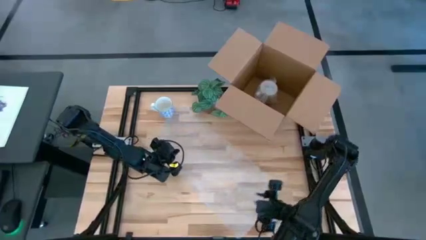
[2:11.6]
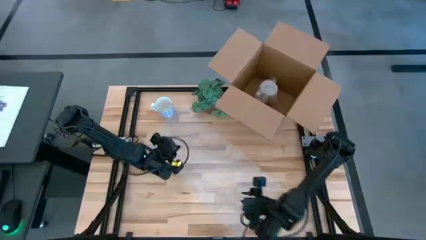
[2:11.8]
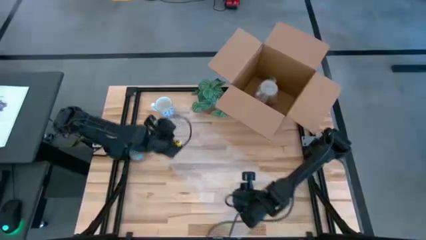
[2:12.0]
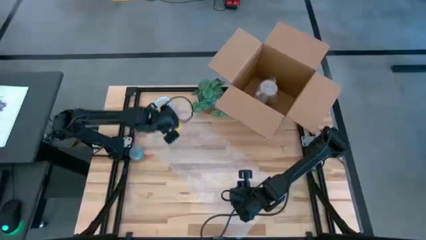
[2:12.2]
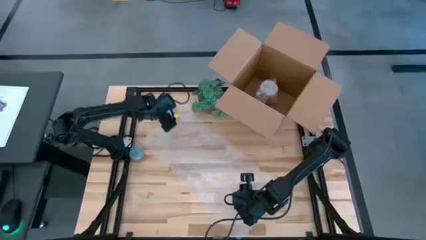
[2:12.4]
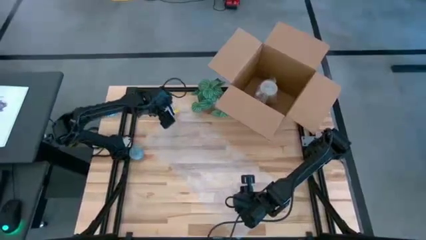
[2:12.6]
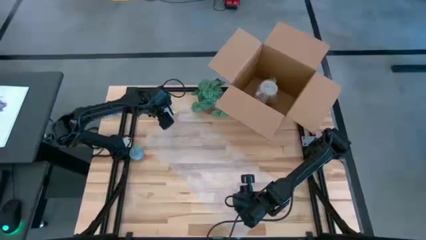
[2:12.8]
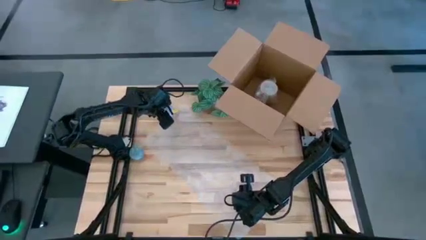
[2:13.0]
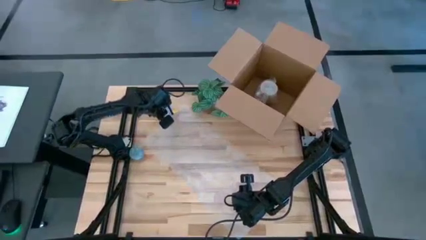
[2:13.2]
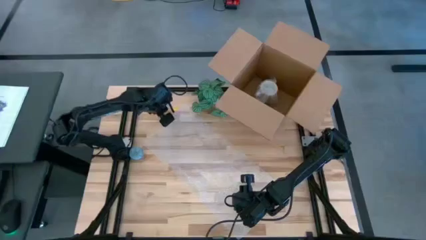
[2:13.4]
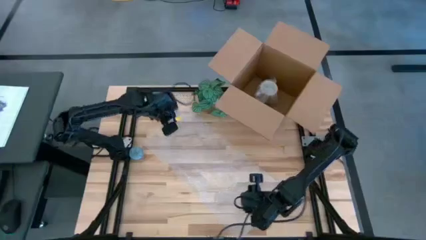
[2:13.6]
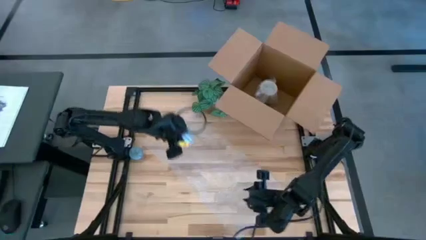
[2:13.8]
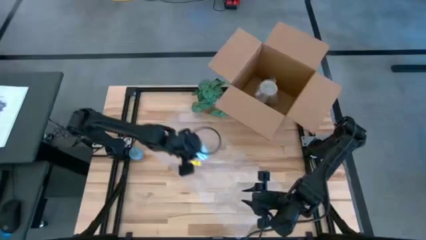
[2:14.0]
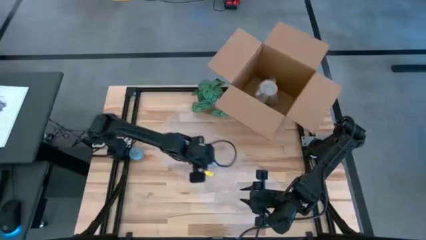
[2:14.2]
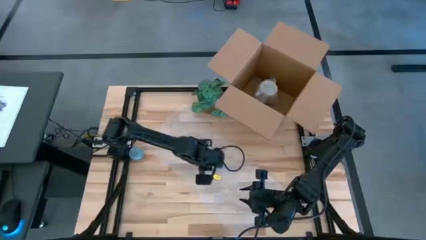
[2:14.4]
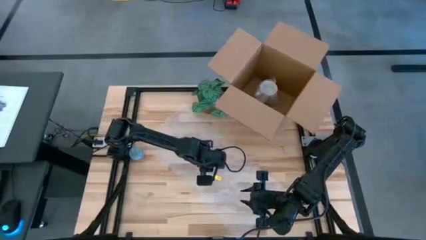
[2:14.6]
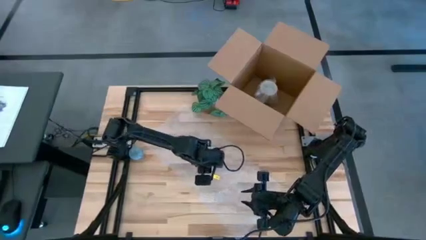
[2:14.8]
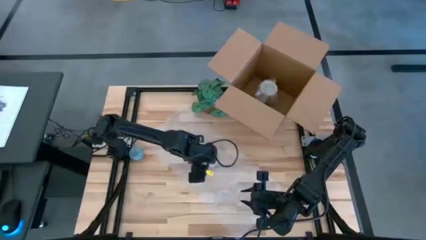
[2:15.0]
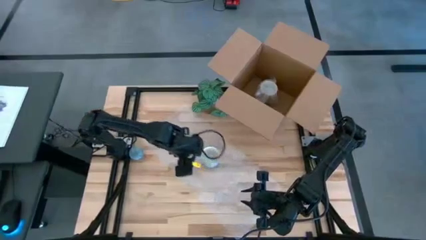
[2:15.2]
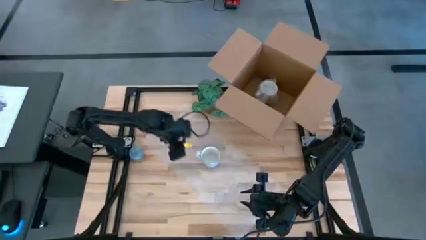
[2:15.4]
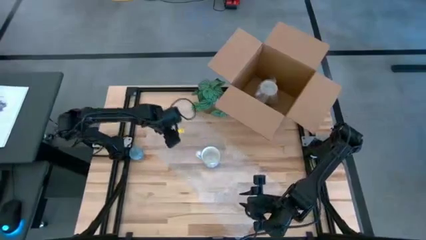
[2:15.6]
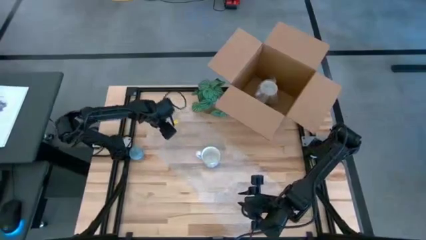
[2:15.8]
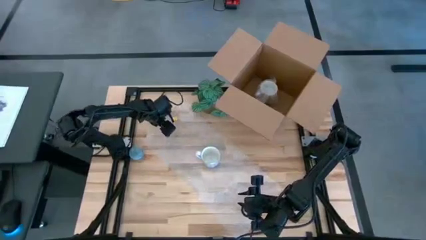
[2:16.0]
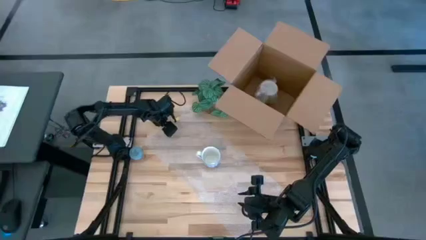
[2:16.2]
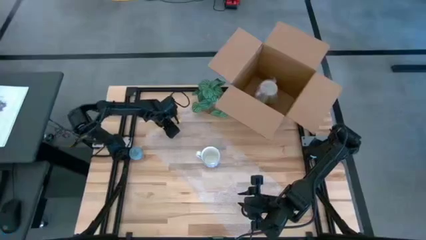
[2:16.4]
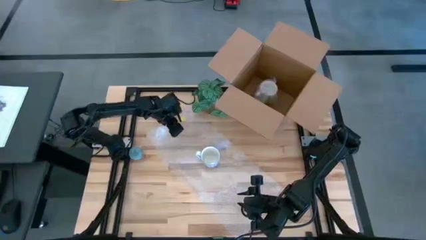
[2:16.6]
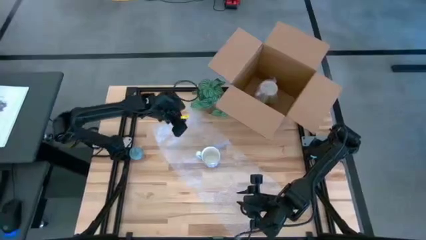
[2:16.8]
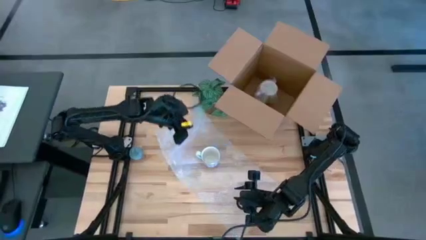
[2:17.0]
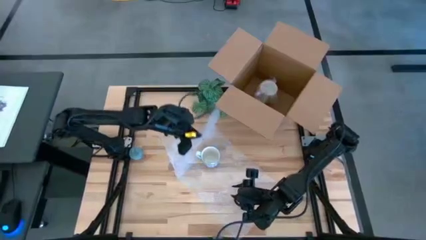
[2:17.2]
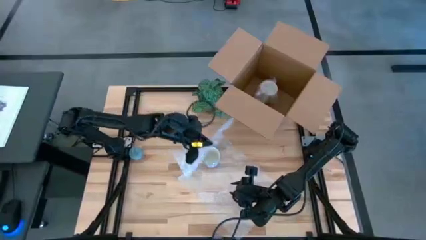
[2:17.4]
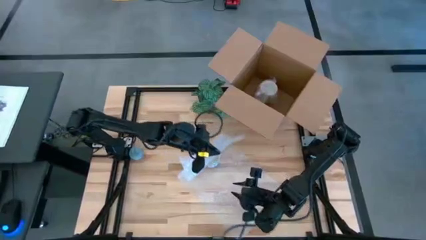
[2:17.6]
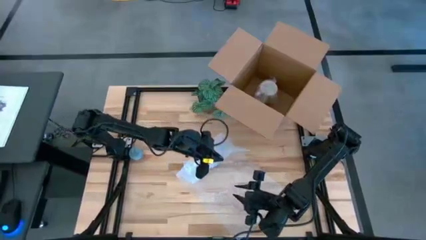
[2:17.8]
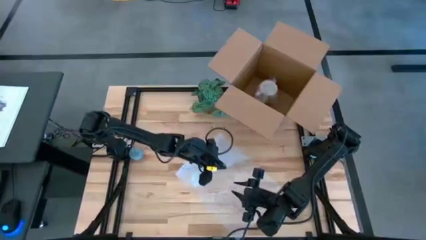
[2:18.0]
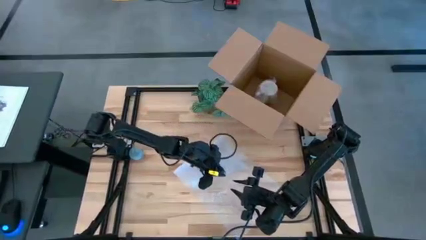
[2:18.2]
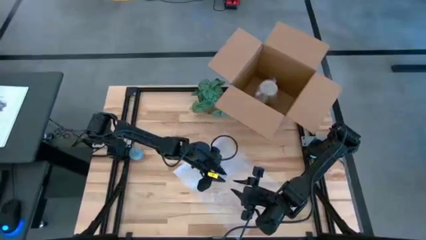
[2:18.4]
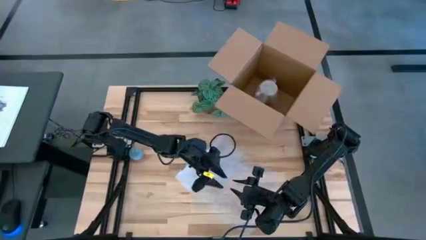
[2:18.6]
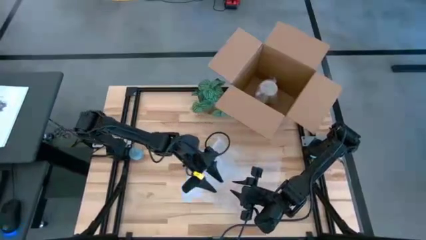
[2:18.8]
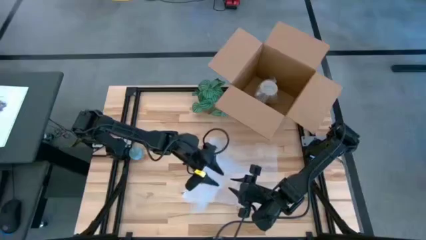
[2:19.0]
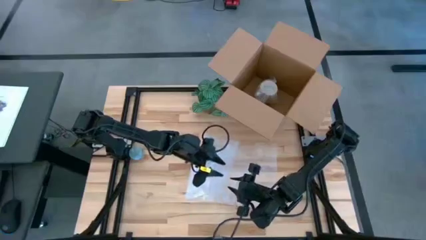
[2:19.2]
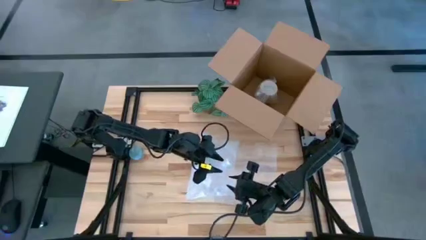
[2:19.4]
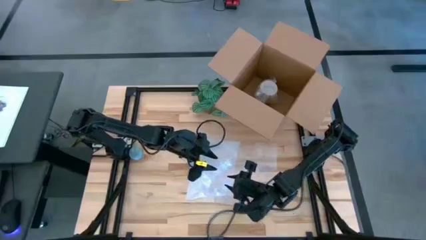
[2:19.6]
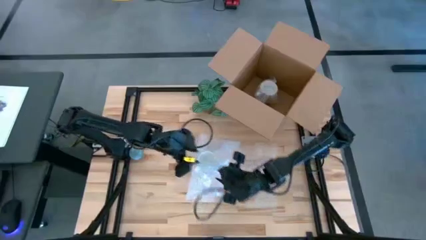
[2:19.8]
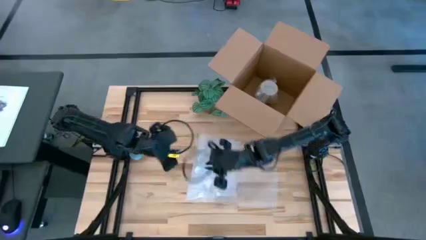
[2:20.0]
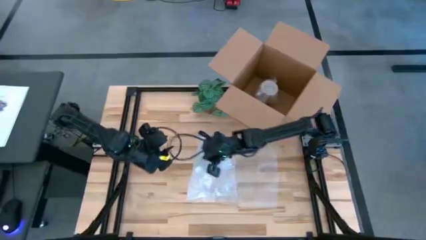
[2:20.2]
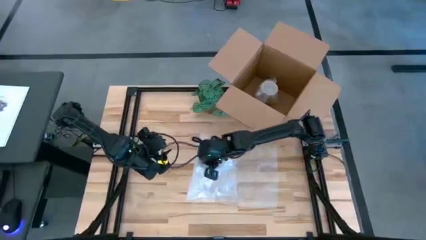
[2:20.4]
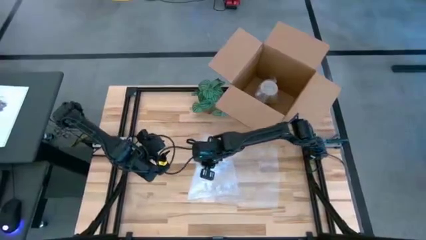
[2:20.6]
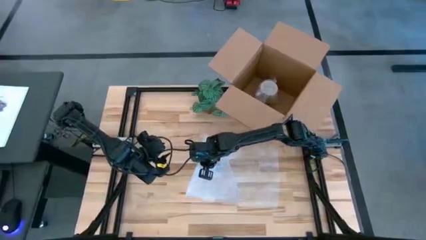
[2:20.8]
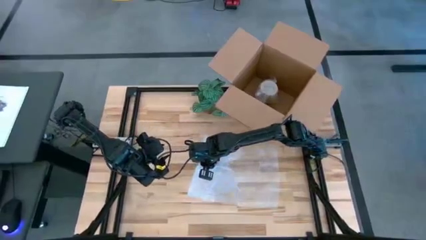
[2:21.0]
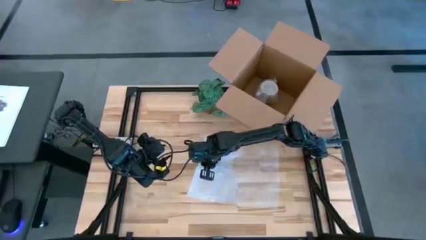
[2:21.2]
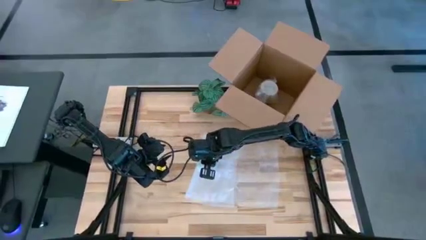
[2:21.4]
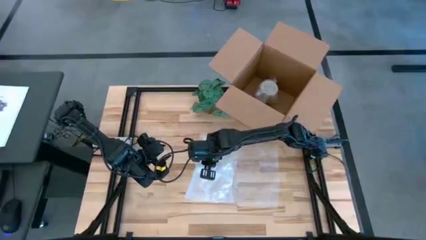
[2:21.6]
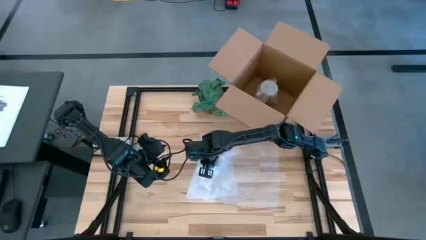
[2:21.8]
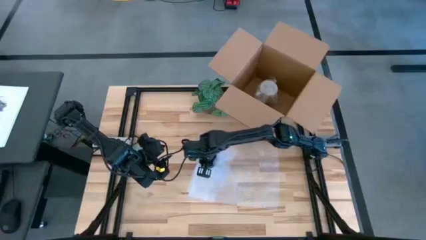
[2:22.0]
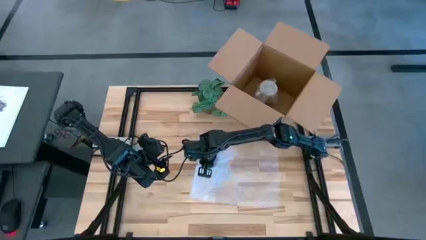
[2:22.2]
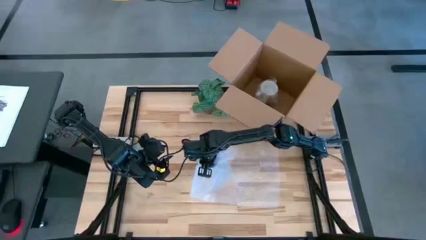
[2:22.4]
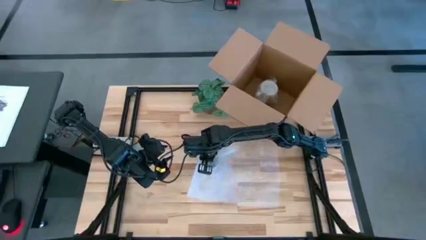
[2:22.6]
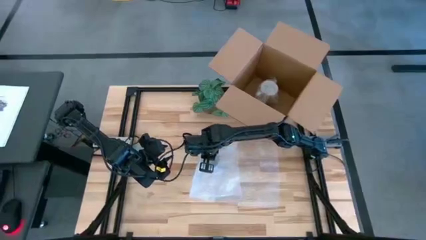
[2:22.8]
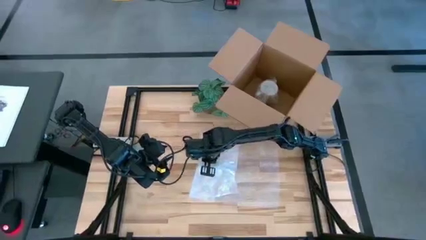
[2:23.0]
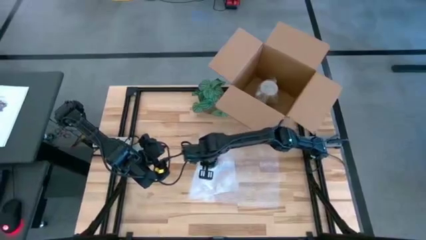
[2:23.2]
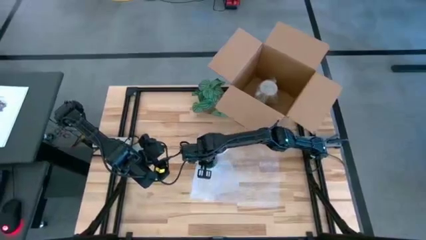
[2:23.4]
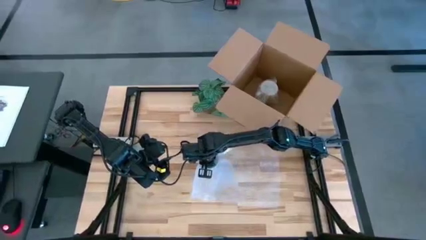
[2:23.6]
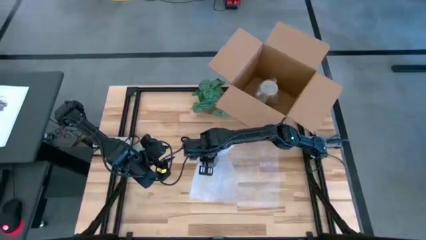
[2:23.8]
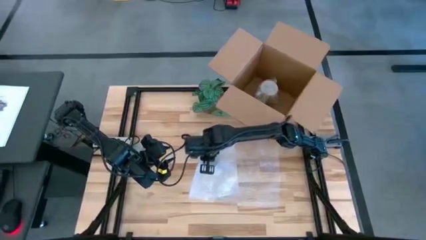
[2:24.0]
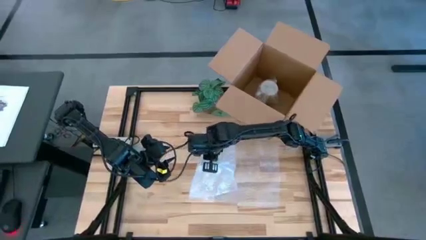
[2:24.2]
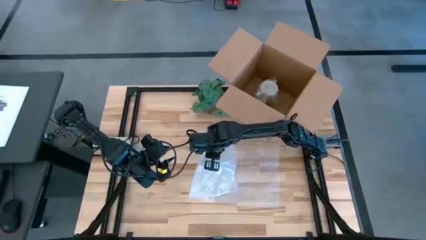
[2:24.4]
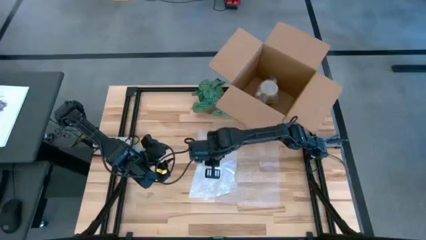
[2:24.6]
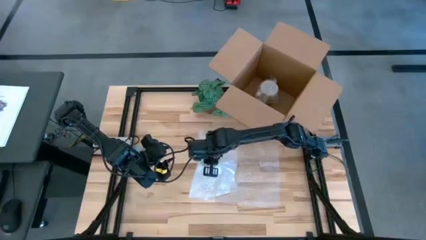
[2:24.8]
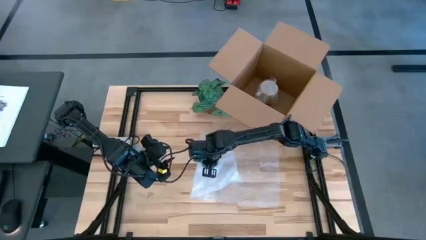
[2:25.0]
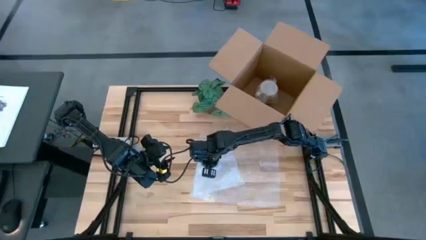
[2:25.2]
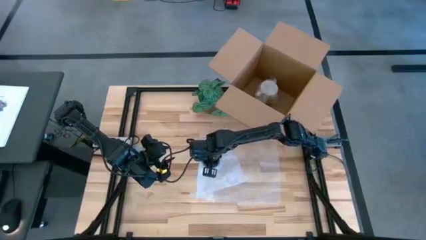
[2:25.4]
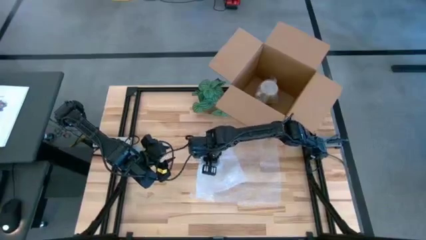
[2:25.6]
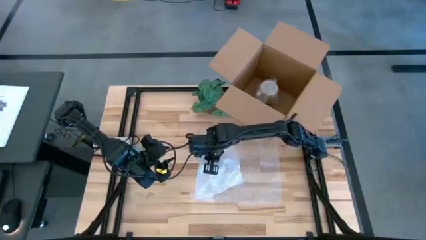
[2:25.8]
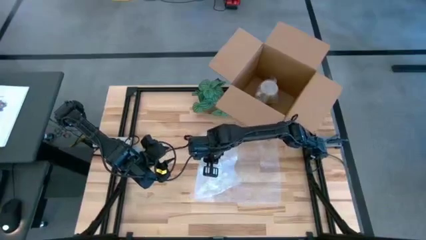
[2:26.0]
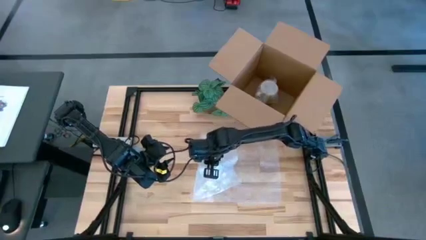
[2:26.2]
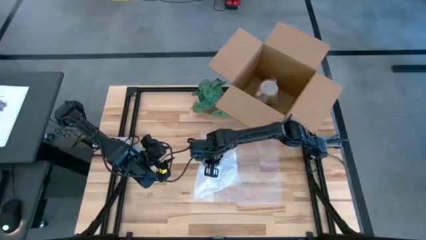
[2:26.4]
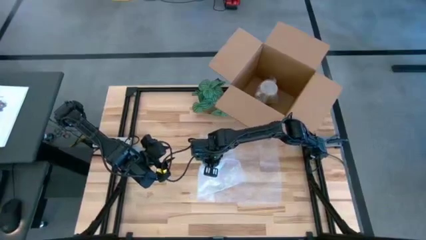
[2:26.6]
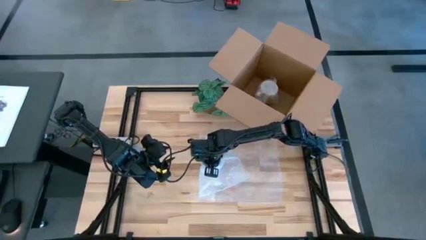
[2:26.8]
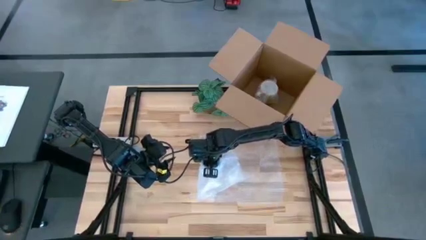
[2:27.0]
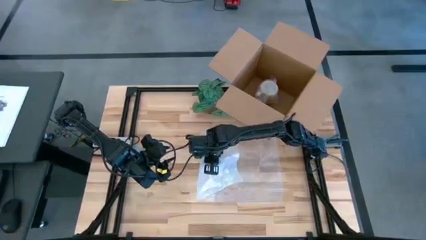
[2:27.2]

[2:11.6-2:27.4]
Task: wrap mug
Wrap the blue mug

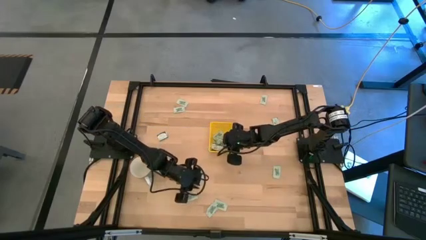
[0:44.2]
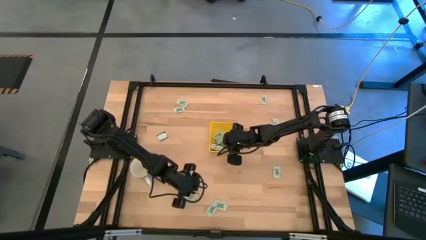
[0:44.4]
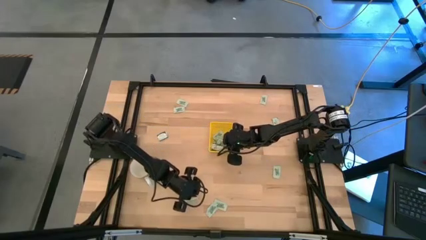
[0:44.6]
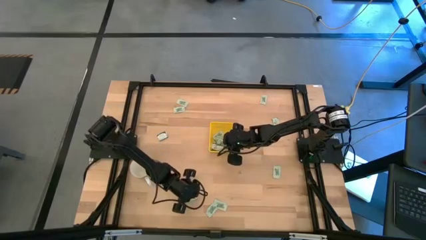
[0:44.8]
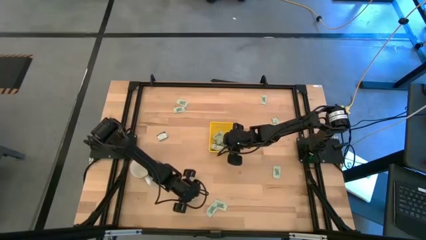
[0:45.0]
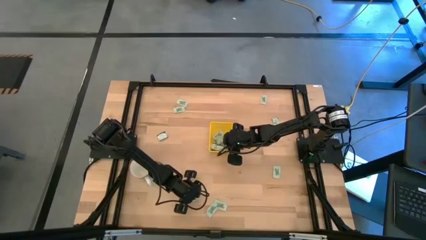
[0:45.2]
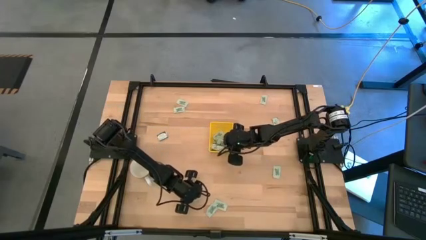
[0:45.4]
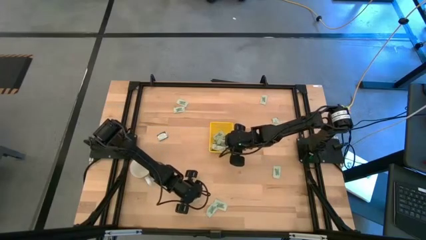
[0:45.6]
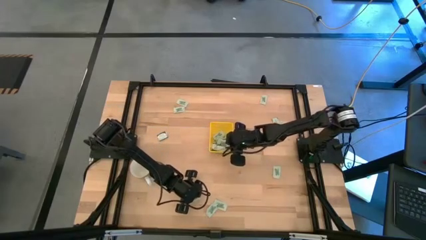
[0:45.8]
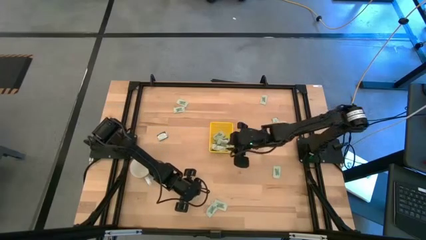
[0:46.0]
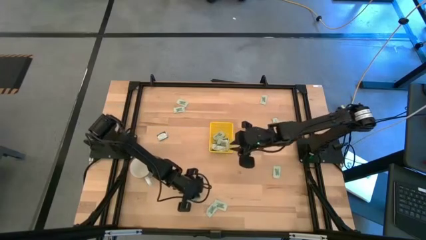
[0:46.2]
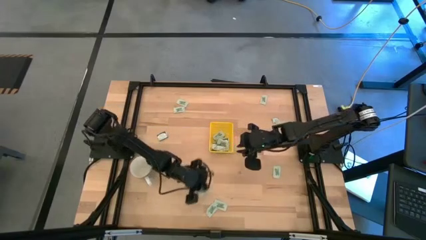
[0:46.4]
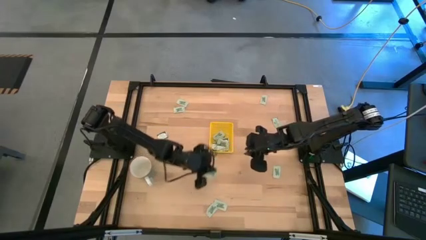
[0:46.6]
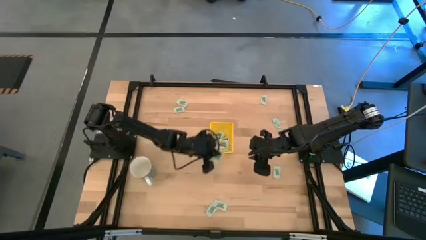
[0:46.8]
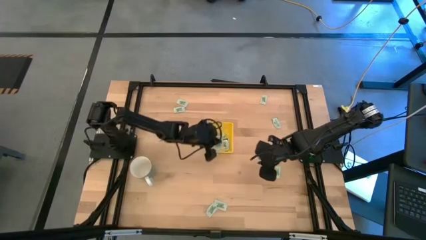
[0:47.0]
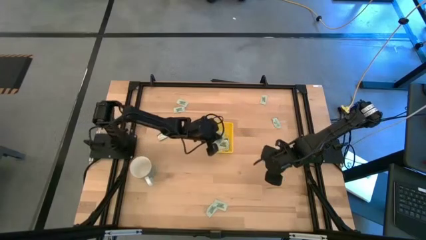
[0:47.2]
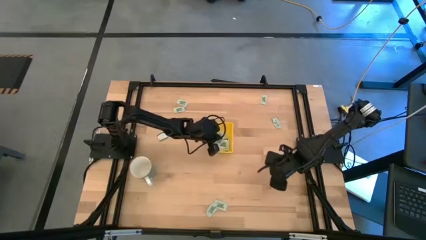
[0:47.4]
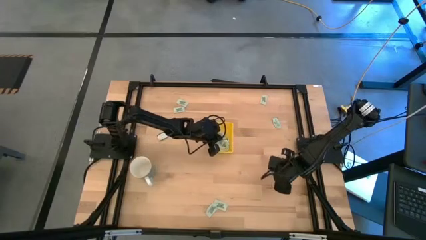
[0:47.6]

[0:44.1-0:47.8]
Task: Pick and place Stevia / Truvia into bins
Put the white stevia packet into the yellow bin
